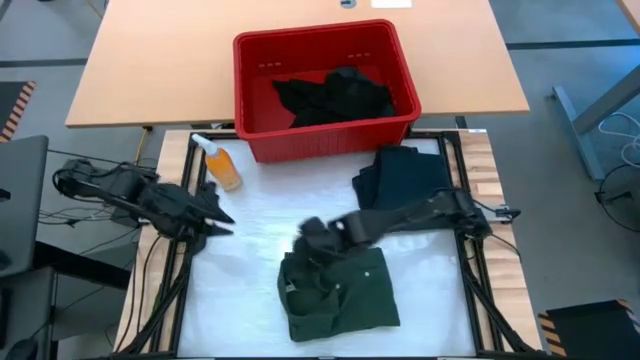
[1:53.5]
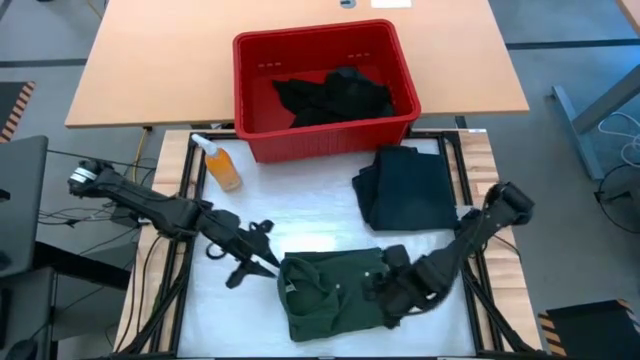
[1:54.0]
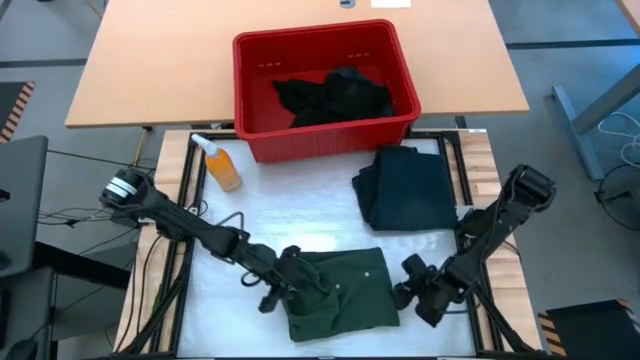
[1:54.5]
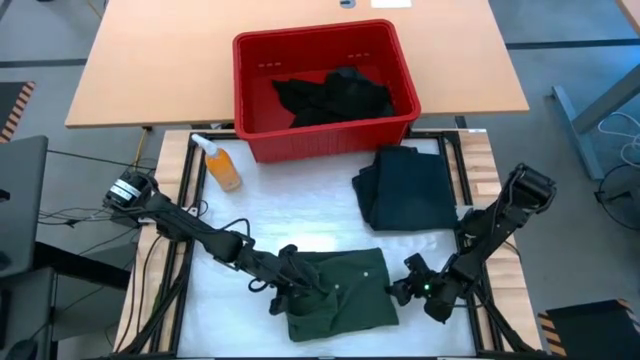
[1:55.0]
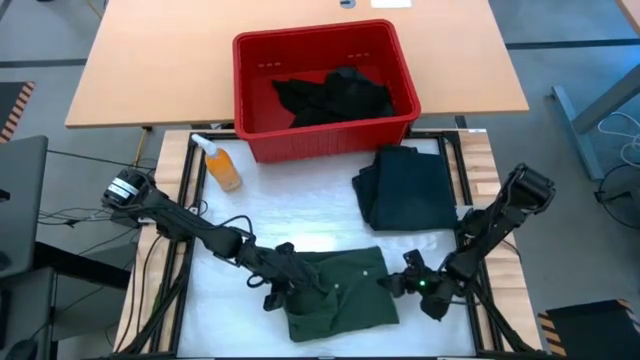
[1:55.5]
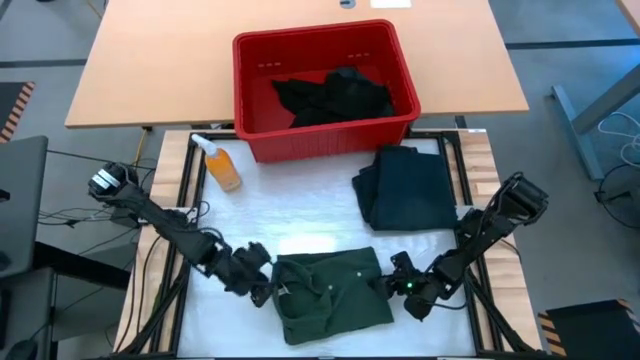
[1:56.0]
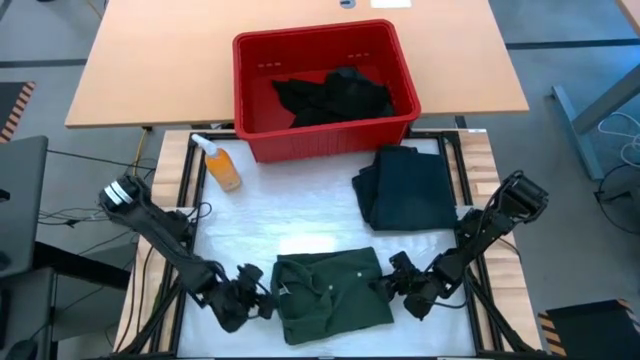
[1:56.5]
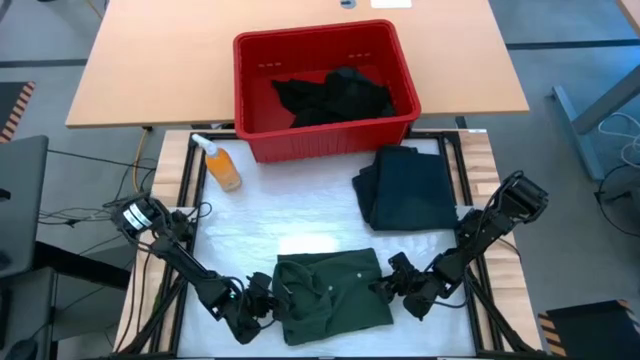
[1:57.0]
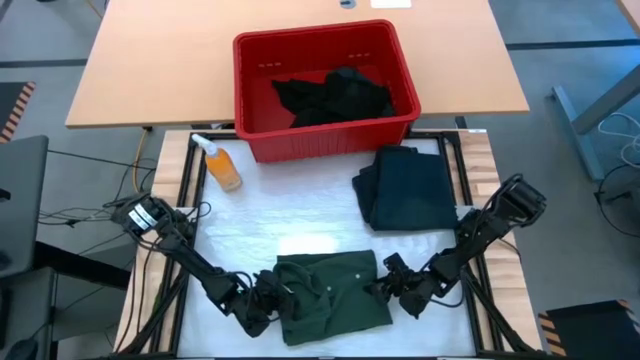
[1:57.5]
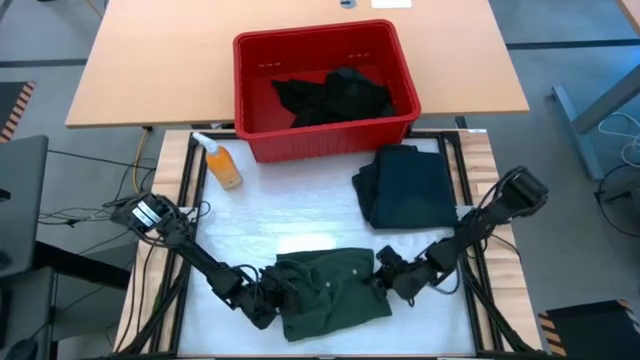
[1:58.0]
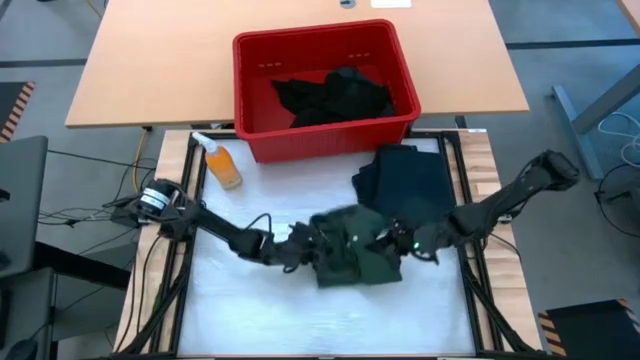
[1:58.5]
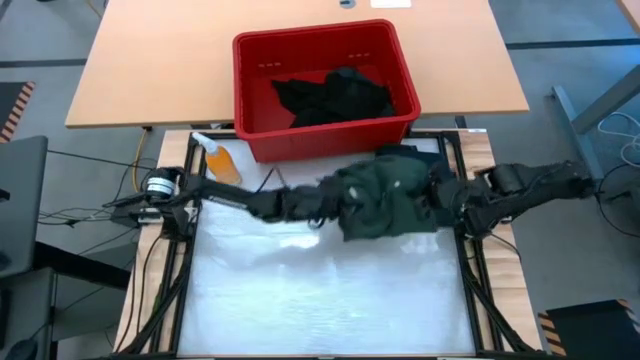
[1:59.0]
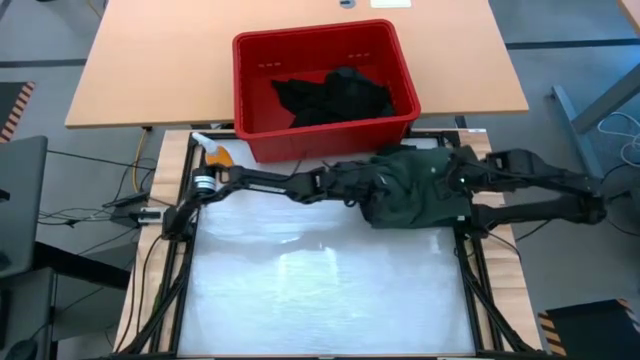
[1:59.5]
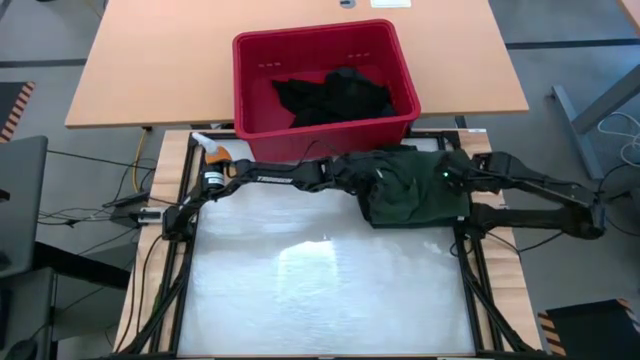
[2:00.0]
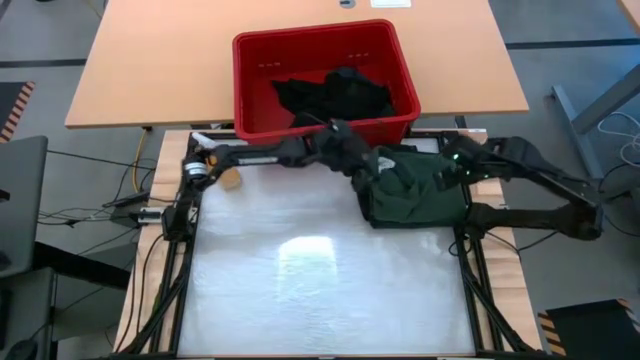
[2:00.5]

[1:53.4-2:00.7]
Task: Fold laundry
Stack the green polo shirt on top of the dark blue pants

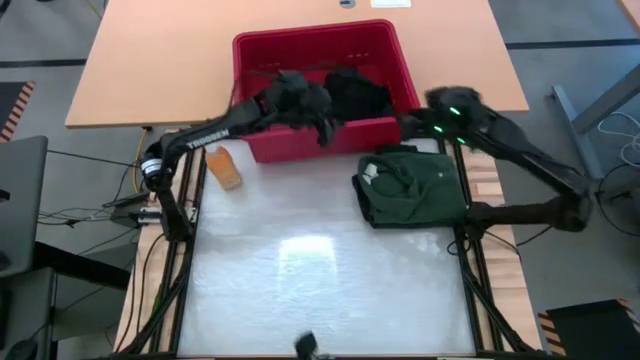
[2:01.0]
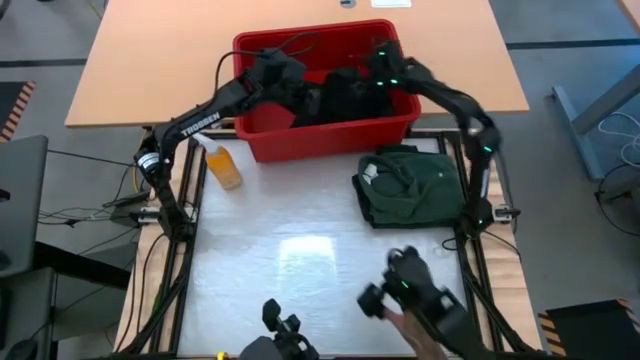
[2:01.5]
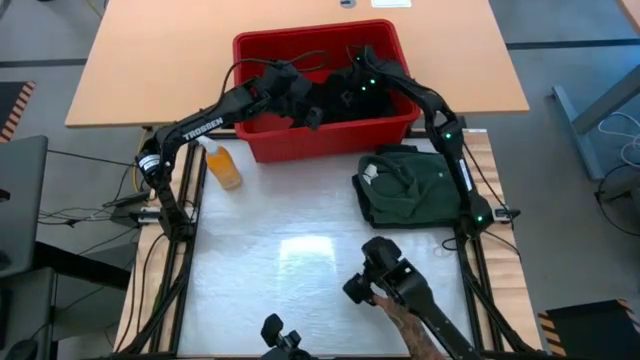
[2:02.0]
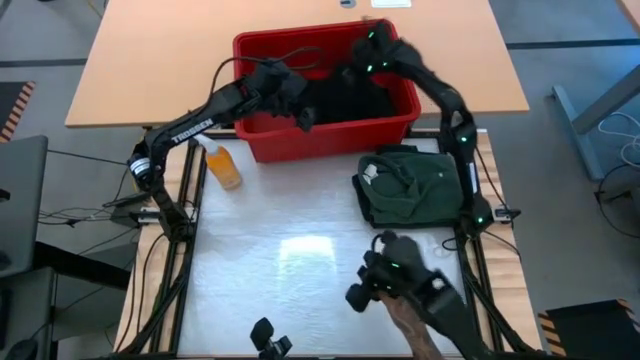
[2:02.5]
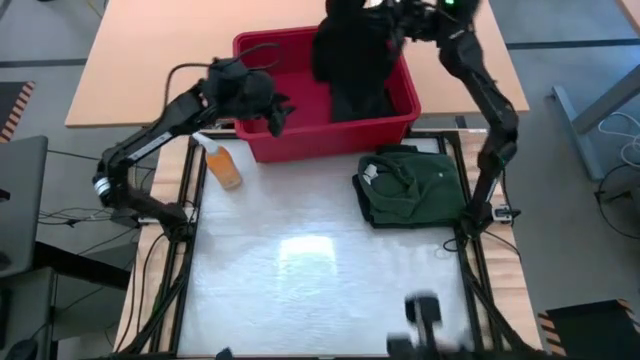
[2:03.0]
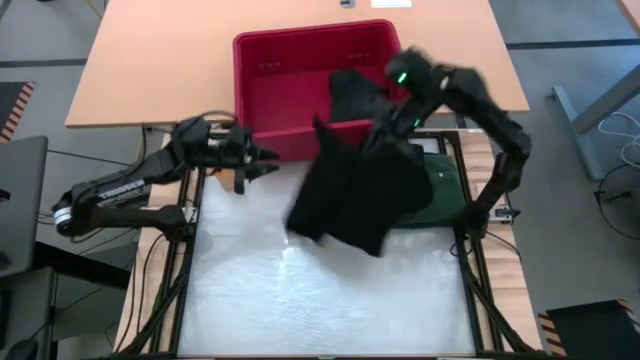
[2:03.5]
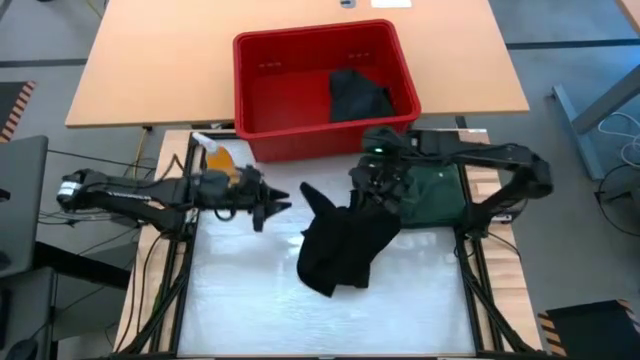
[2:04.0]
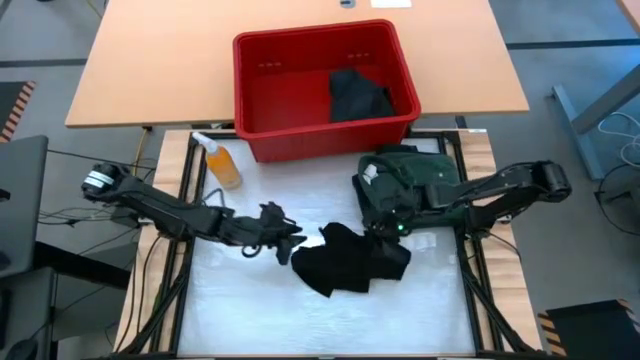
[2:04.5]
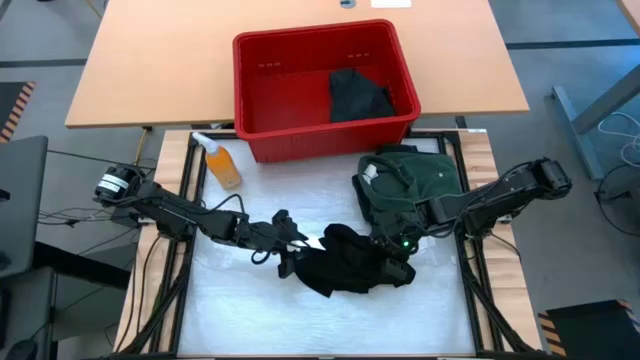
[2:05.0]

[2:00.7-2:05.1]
Remove the black shirt from the red laundry bin onto the table

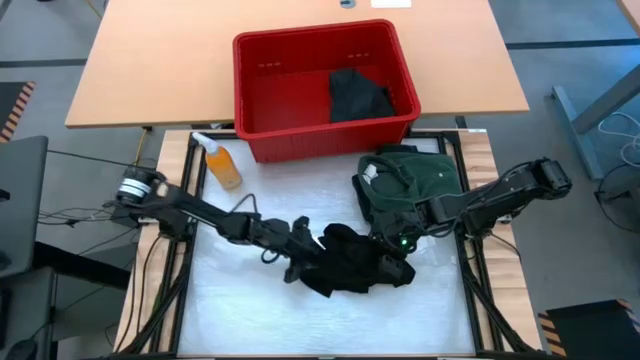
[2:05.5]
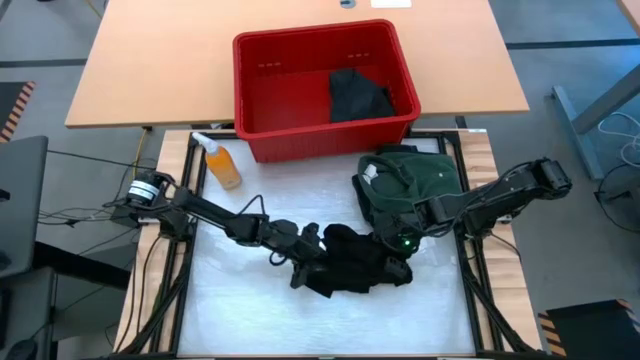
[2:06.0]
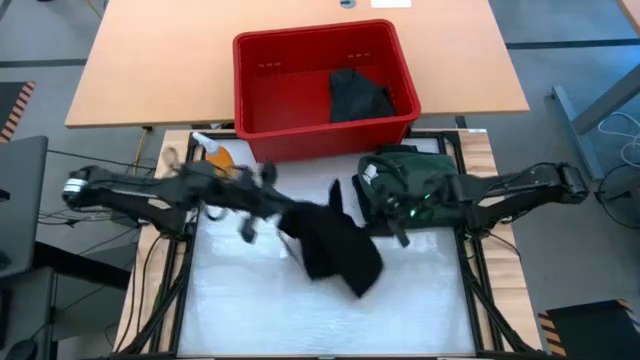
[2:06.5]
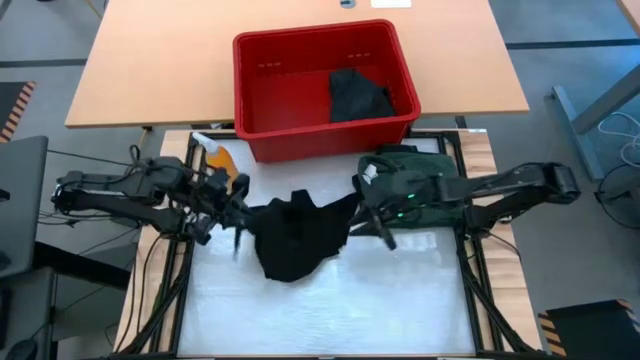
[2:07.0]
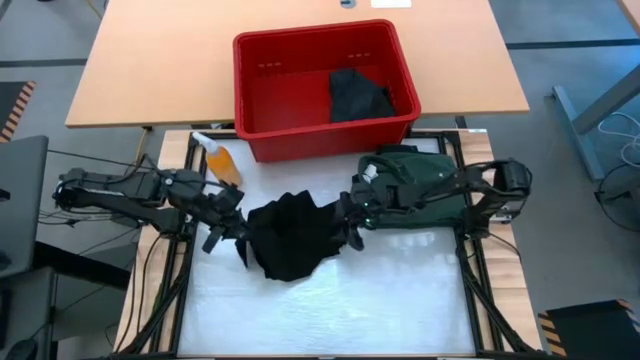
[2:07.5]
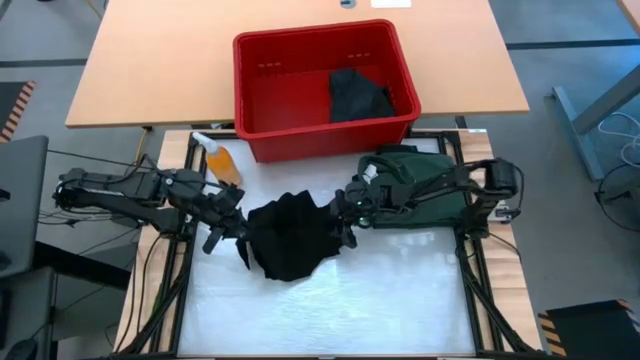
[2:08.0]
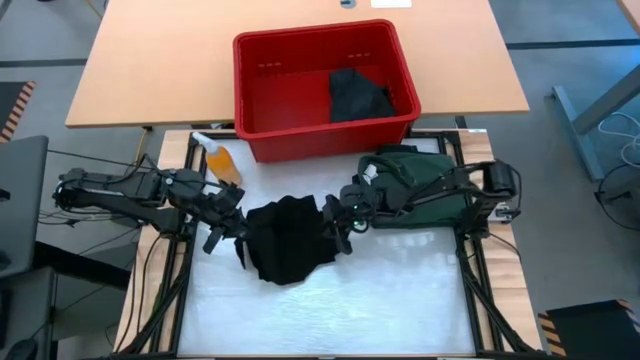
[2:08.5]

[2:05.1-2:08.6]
Fold the black shirt
